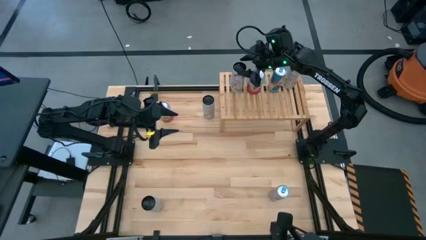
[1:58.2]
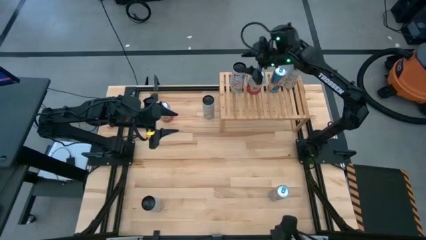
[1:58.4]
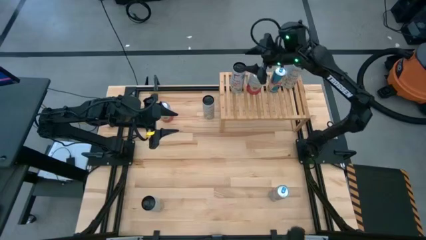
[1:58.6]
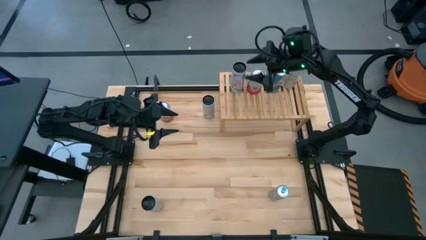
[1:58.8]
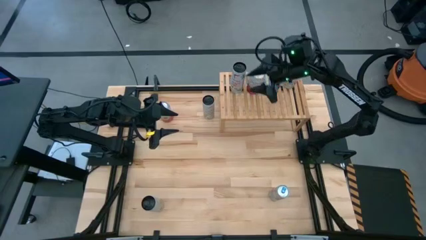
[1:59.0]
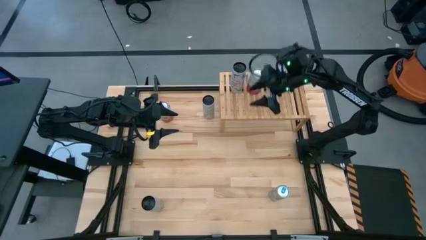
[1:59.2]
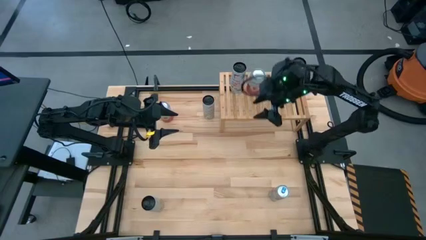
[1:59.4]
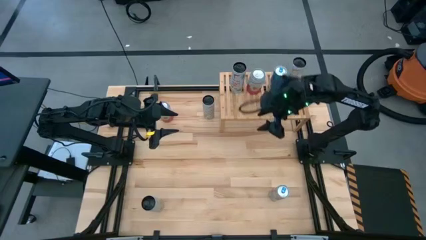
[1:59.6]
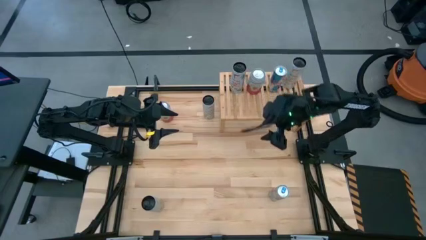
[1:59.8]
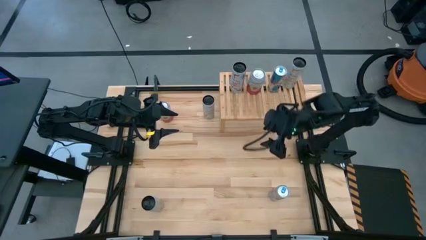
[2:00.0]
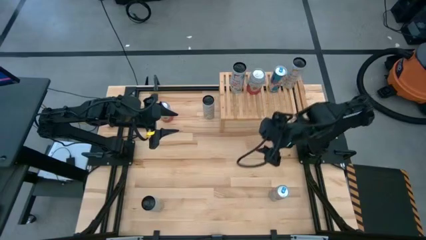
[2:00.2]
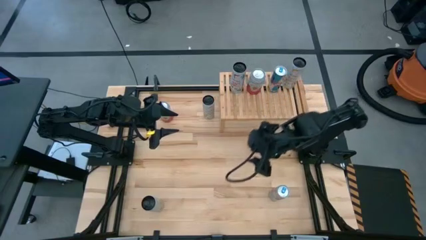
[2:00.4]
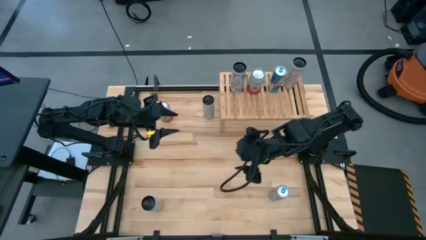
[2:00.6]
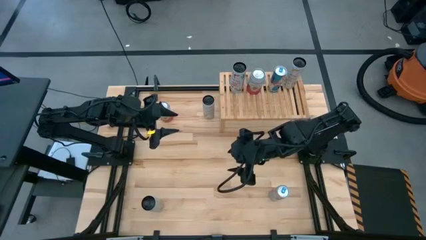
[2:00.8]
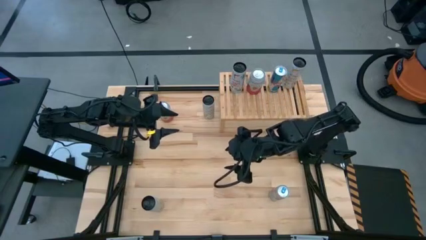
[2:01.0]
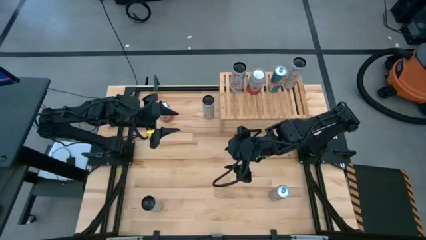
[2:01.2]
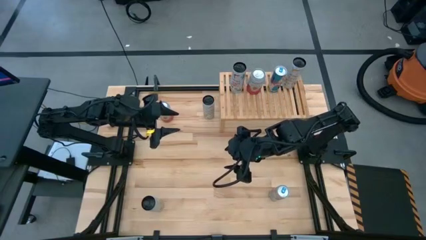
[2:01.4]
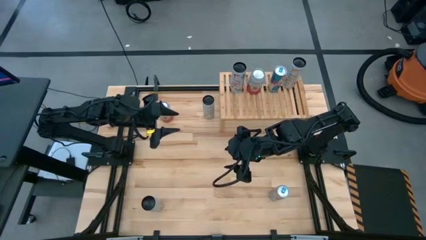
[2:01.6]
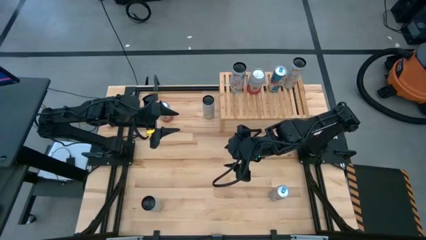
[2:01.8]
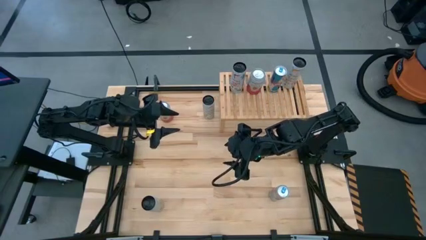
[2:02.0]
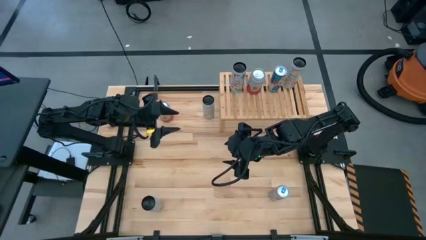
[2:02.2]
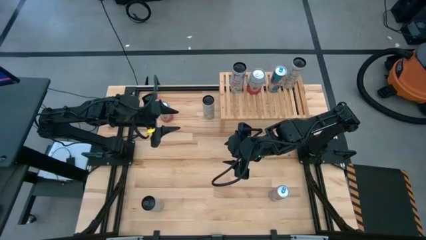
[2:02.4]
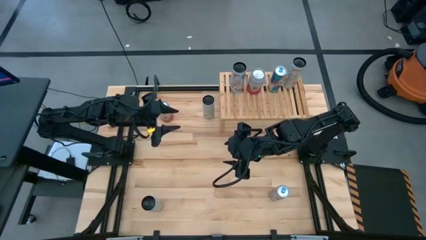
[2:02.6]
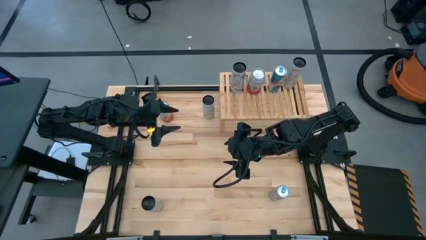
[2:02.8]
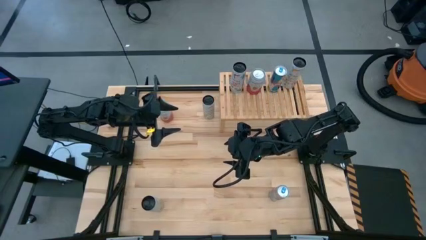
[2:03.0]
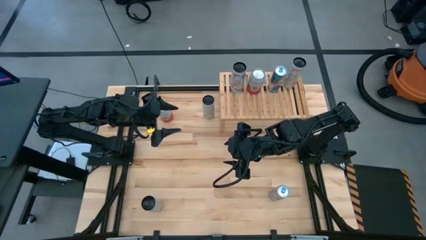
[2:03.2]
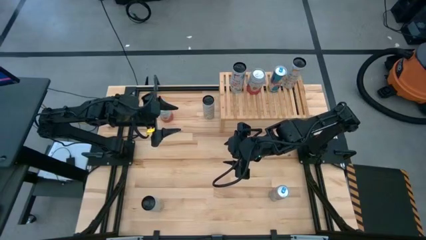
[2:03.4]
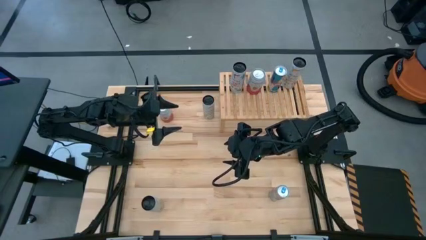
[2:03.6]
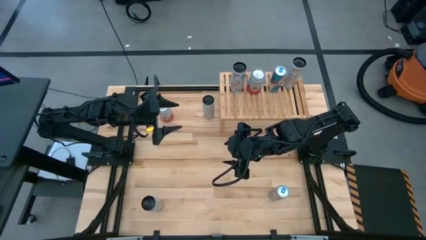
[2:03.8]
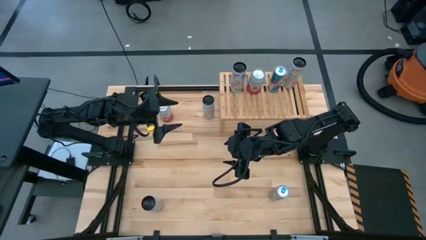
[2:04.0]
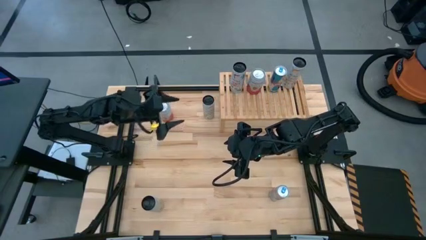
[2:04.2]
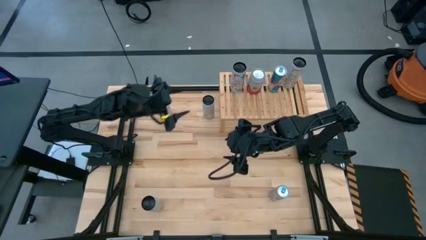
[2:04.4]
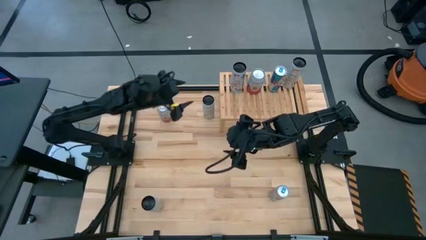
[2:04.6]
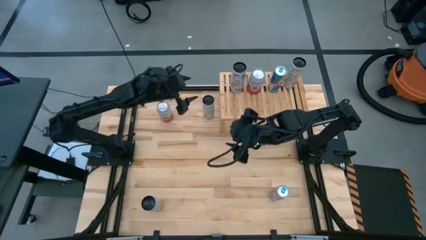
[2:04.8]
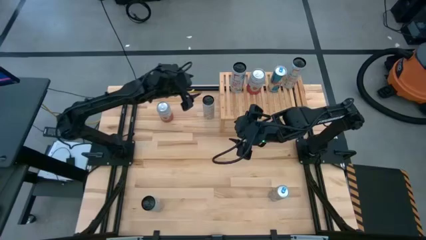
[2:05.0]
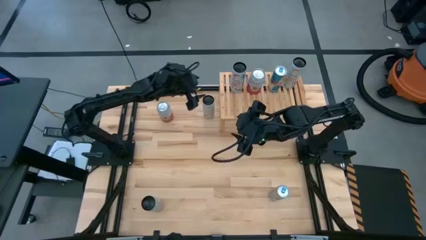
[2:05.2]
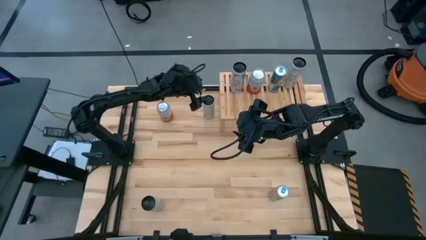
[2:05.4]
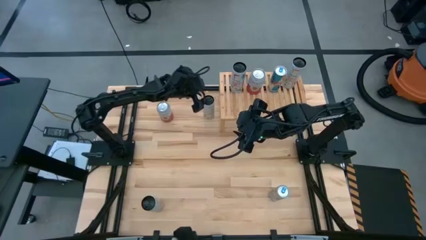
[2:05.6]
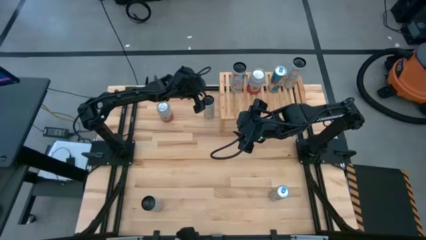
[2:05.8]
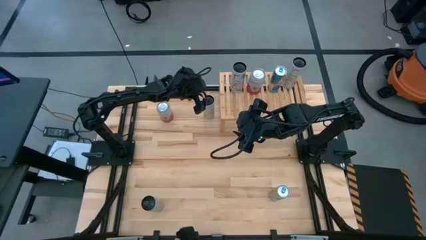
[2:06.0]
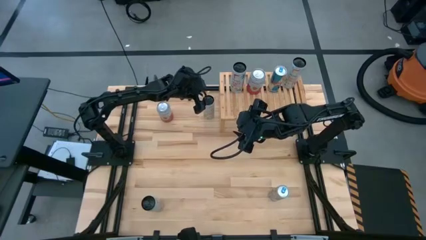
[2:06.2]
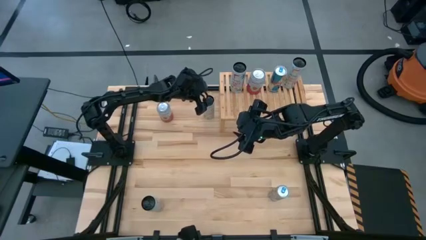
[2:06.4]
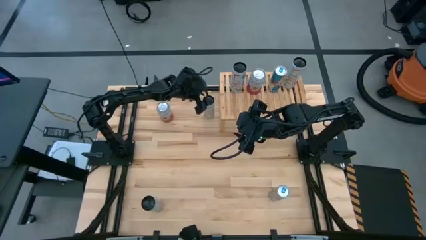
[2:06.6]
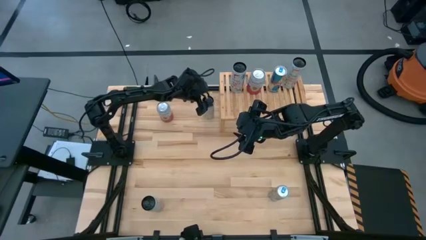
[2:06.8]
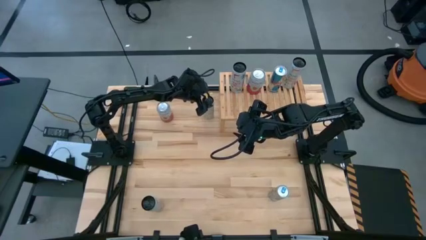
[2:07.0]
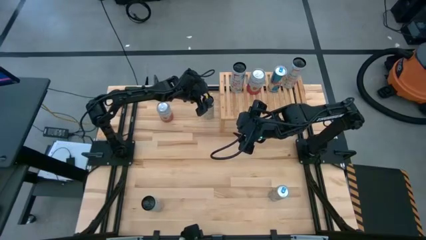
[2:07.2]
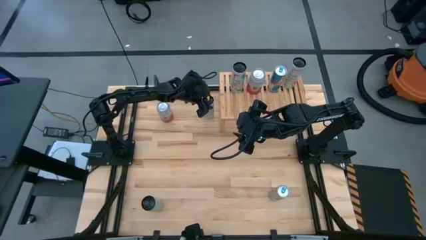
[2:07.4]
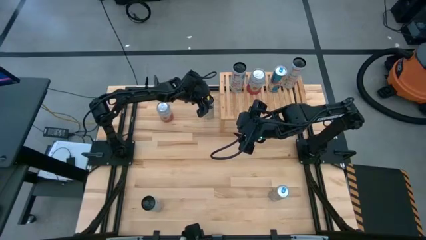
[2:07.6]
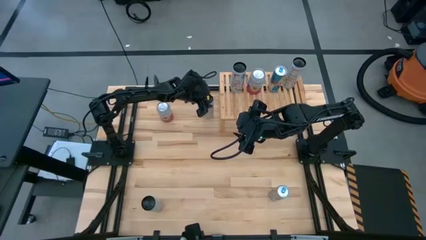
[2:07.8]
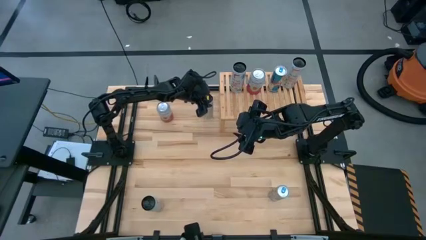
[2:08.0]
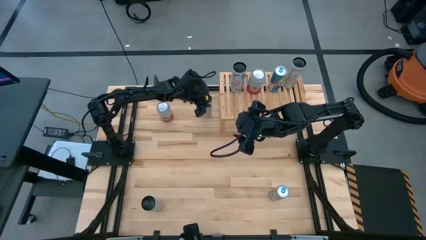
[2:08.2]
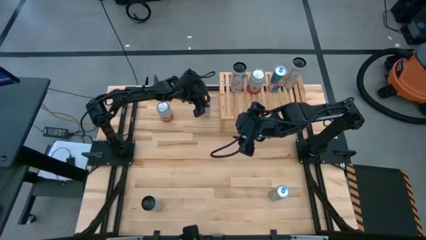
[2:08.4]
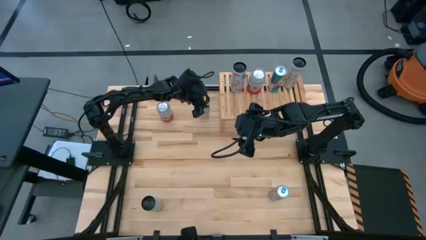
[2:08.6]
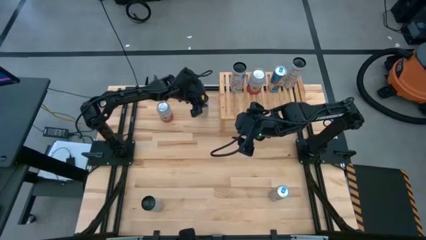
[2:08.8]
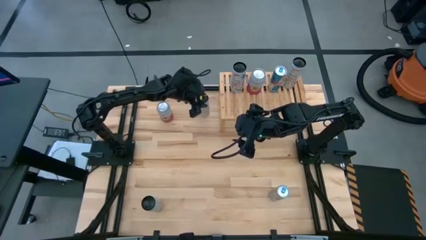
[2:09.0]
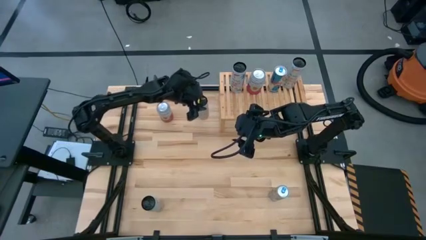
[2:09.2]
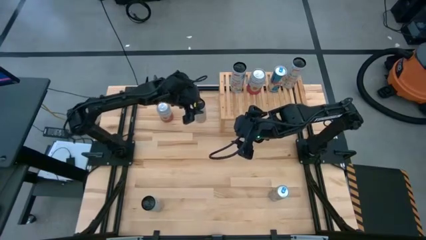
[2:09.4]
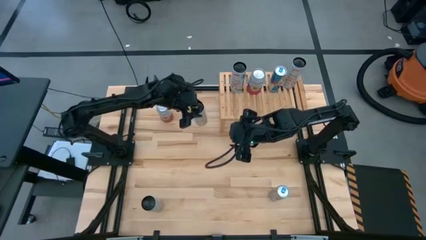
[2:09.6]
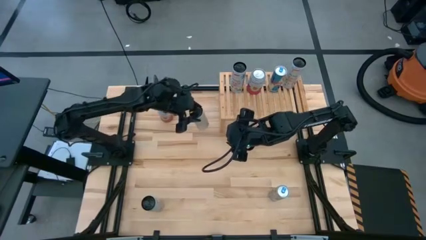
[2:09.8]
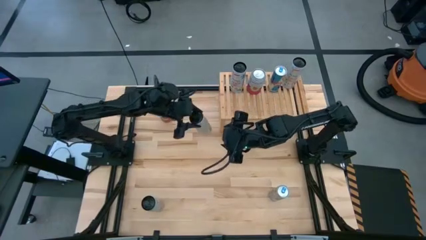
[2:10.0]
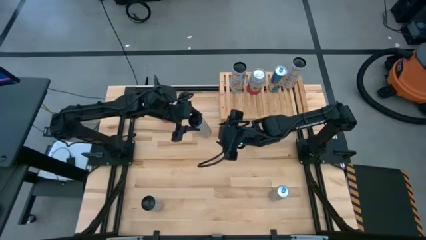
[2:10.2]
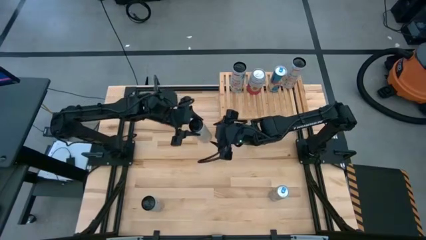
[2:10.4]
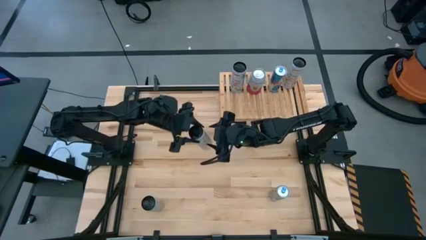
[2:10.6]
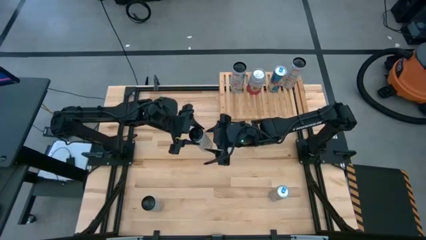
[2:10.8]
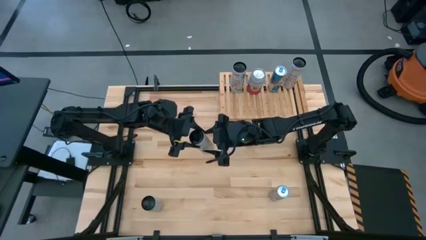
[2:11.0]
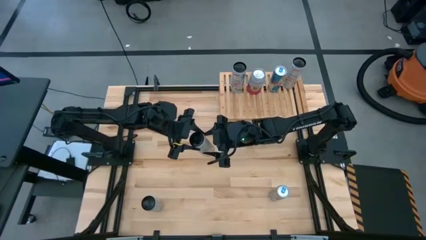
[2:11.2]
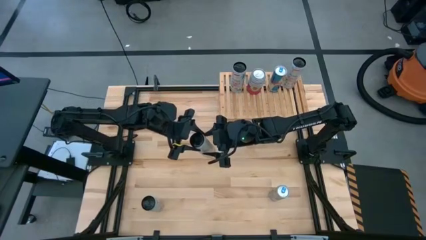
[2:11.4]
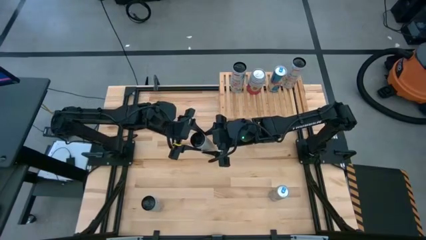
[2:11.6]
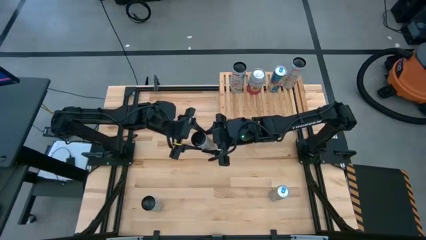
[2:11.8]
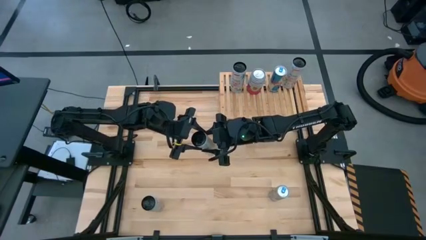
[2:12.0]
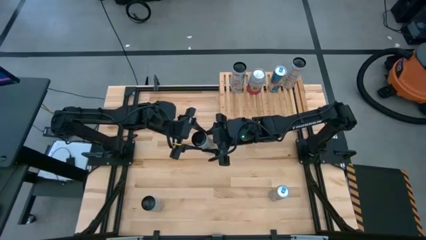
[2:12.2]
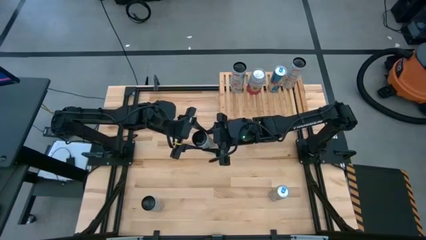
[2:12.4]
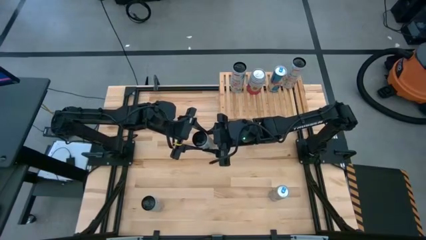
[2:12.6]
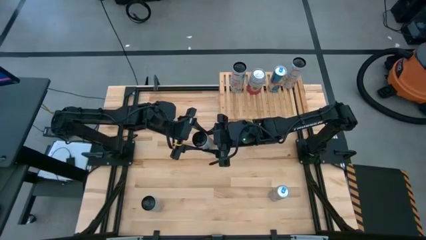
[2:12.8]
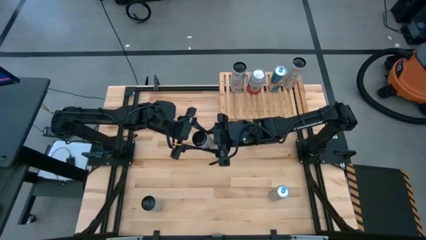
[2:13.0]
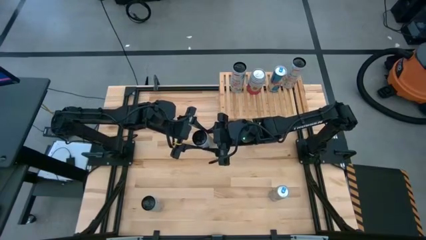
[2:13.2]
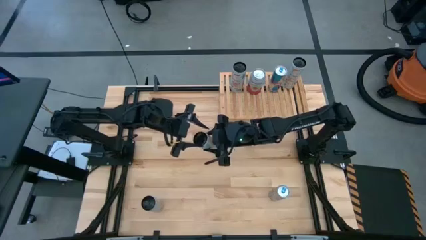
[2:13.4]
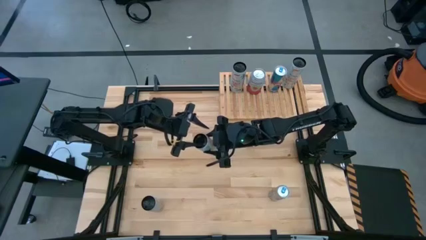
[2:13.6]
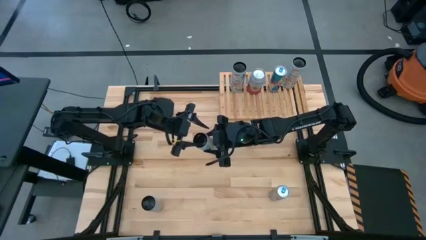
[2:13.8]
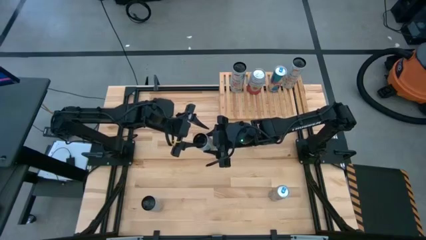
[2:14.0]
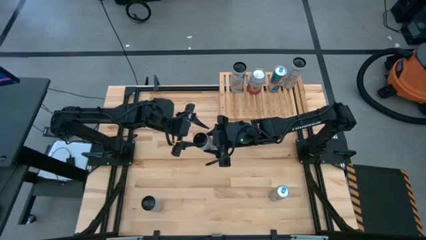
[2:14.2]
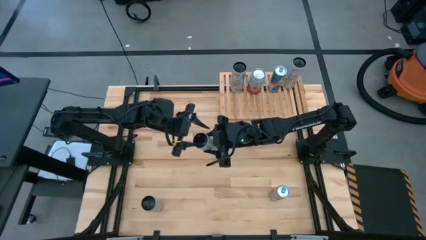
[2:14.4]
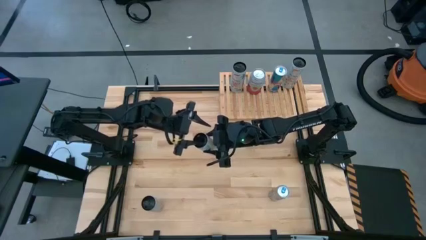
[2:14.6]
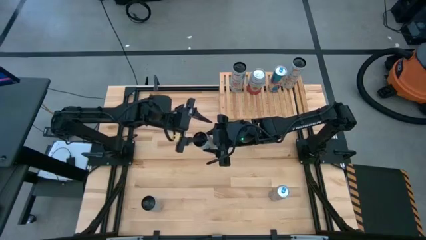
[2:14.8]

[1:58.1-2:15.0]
Task: Place canned beverage on shelf
Put the top white-yellow soda can on the shelf aligned with the other white-yellow soda can
